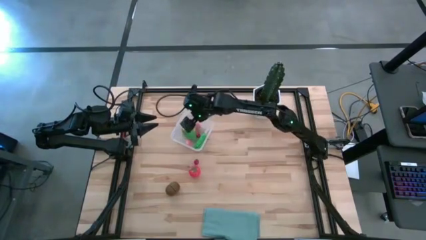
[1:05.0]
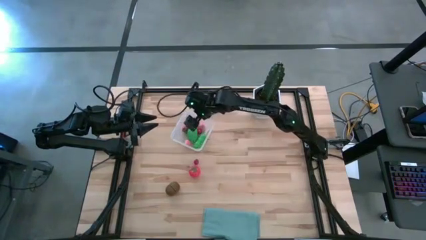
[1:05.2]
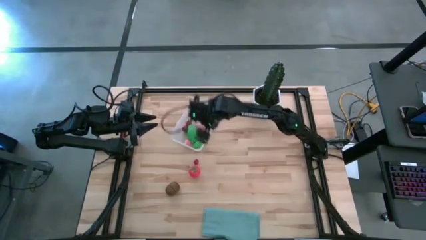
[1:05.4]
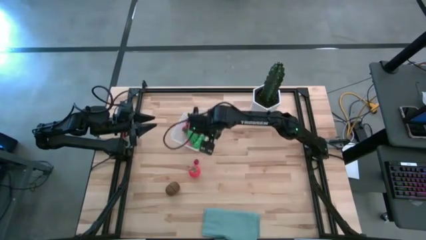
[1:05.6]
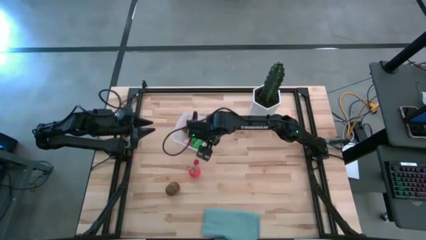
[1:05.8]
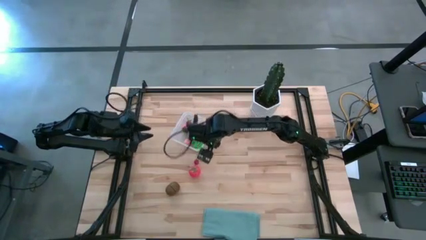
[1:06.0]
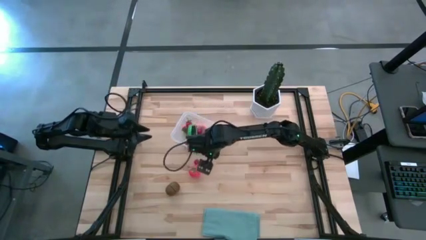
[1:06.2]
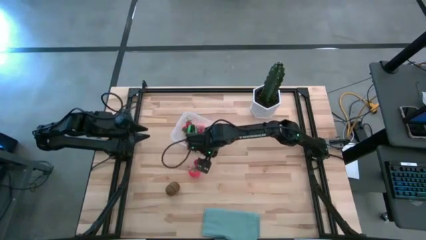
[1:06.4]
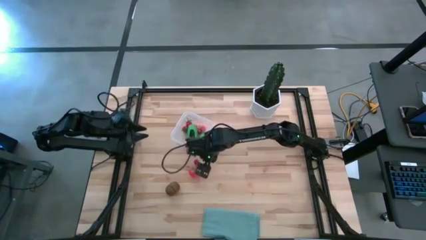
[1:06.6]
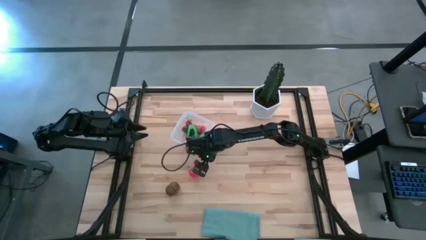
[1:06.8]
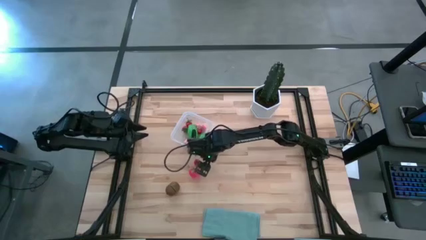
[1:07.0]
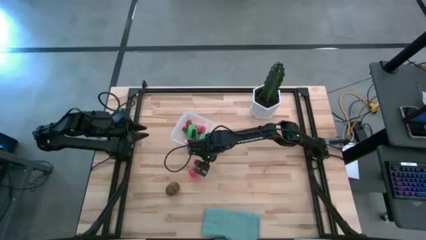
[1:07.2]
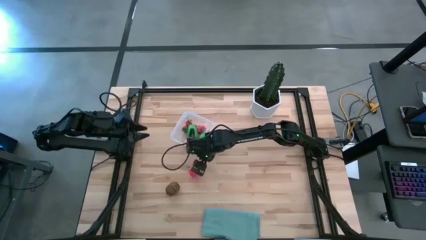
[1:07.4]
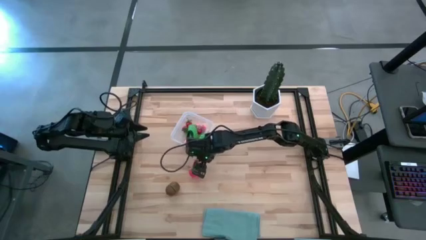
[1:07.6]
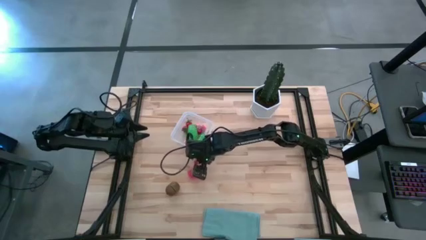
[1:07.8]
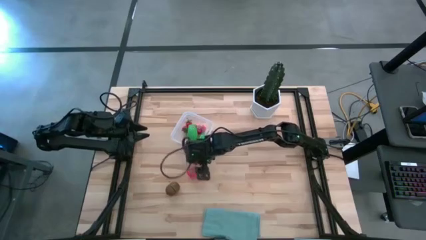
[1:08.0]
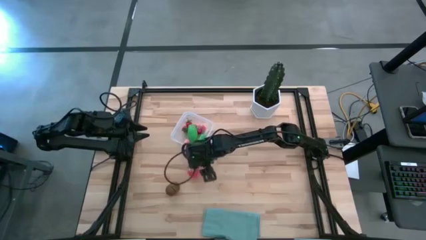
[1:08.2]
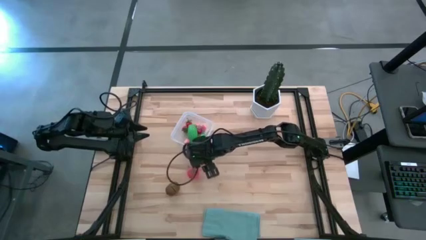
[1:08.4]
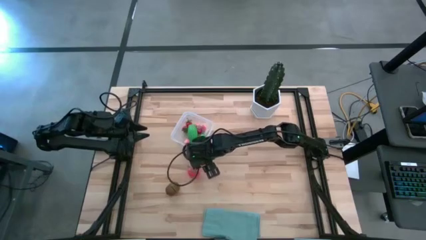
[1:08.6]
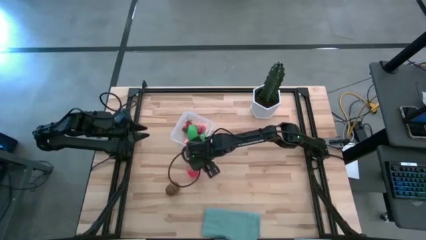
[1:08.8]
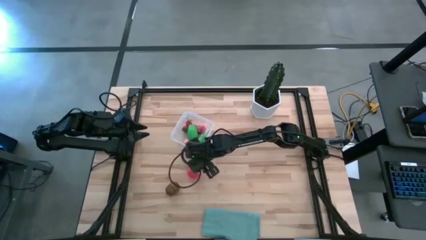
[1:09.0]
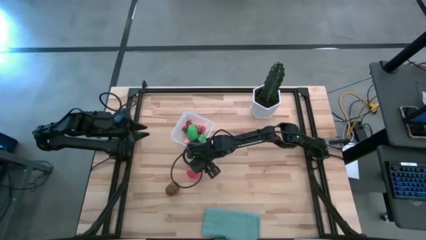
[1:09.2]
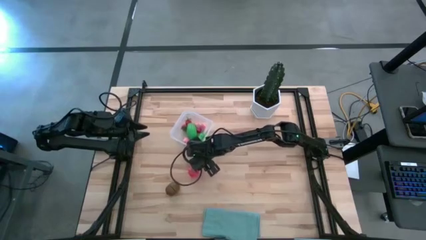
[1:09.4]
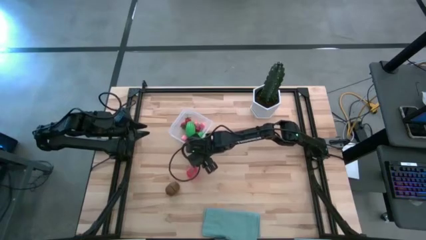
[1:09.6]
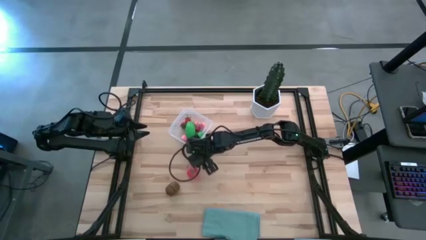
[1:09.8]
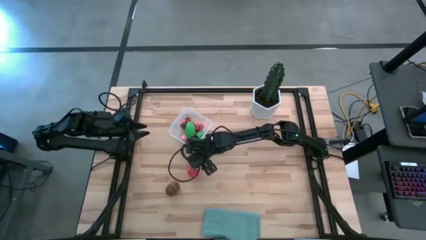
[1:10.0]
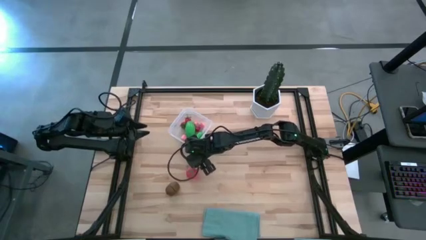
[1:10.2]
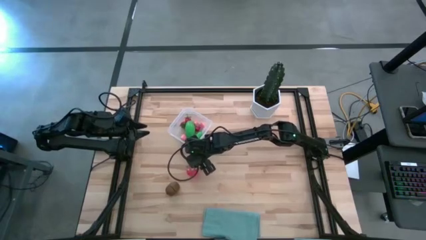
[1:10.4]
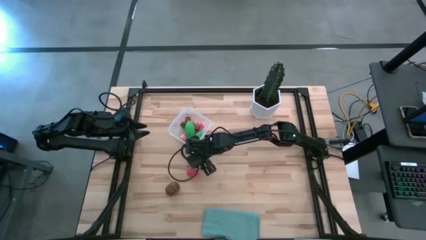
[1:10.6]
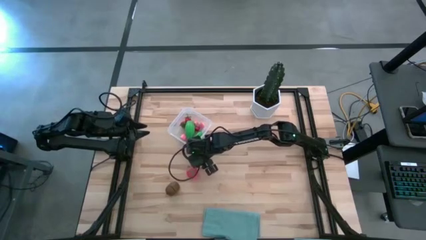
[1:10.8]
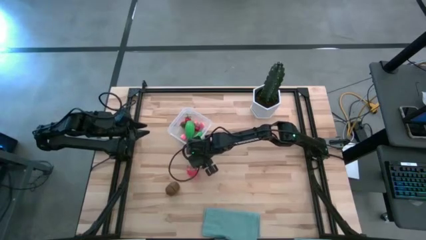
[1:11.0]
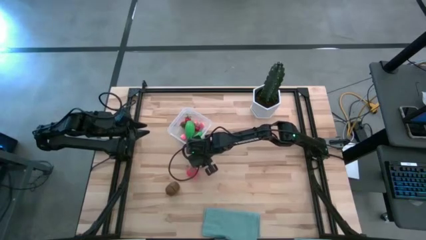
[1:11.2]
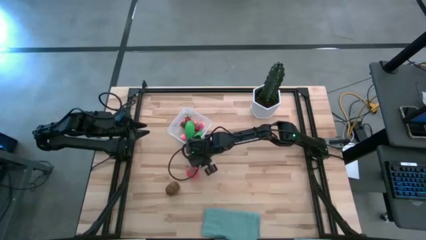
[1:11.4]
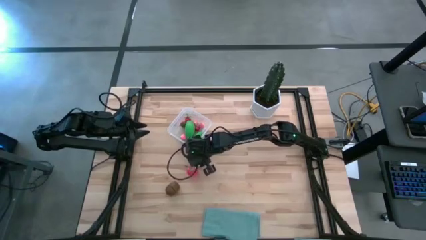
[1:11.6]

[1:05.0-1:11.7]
Task: Pick and placing Produce into tupperware
Put the red cherry into the transparent bin

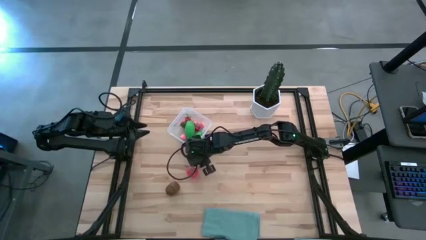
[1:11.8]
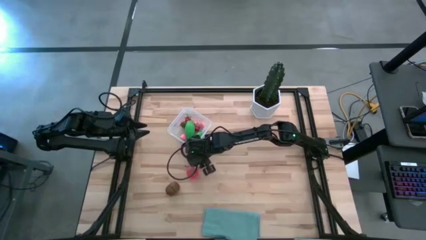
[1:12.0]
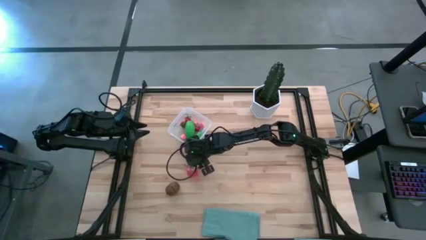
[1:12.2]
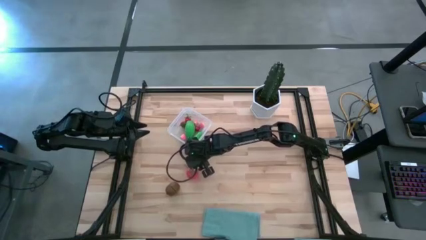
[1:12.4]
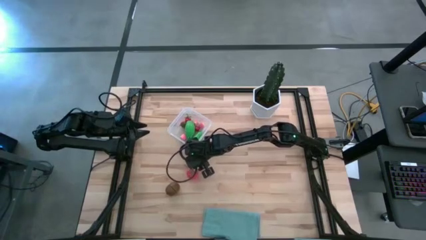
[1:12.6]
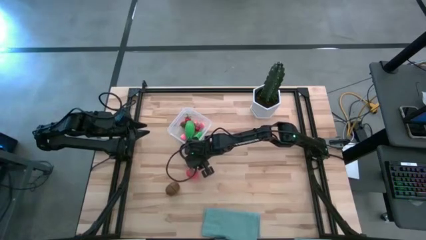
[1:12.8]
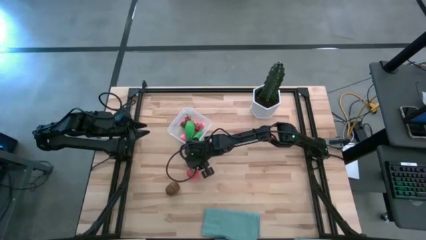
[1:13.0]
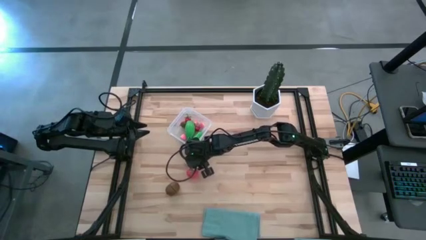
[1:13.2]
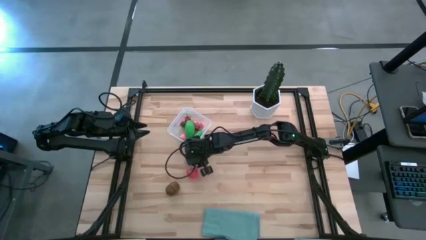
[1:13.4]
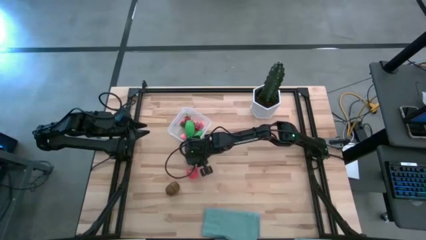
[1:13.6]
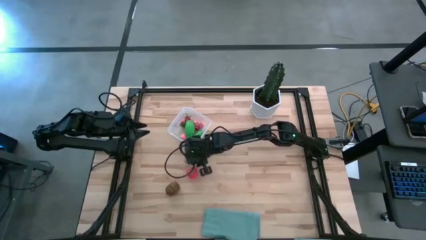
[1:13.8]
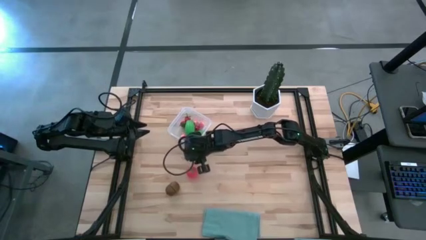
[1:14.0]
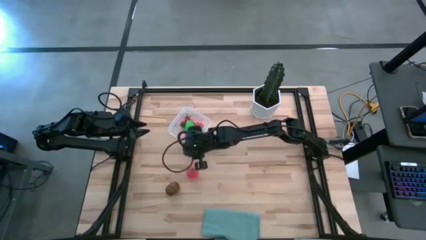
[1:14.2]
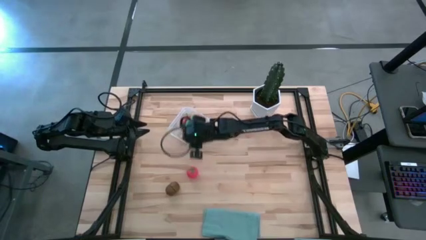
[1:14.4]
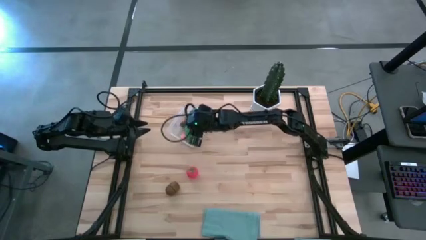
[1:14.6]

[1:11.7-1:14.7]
Put the red cherry into the transparent bin

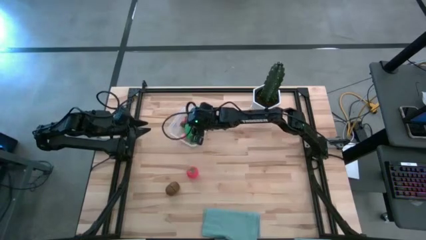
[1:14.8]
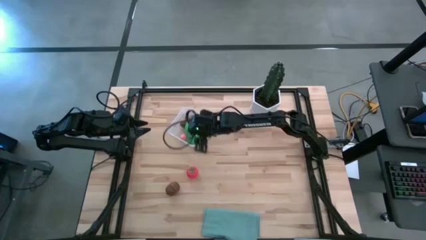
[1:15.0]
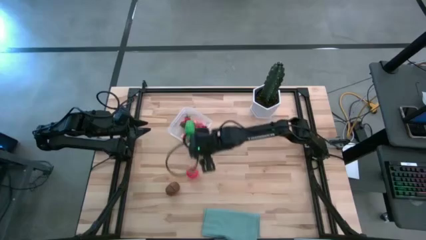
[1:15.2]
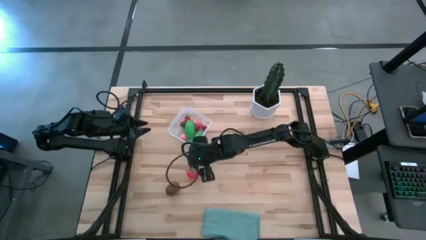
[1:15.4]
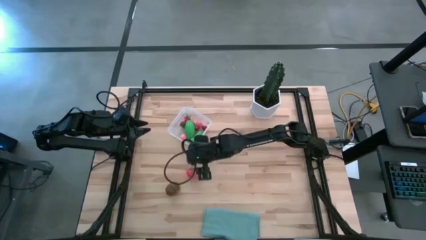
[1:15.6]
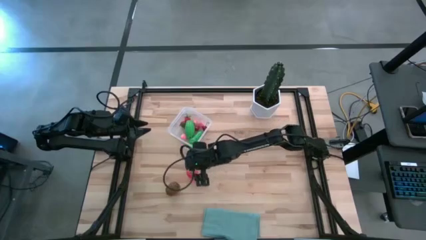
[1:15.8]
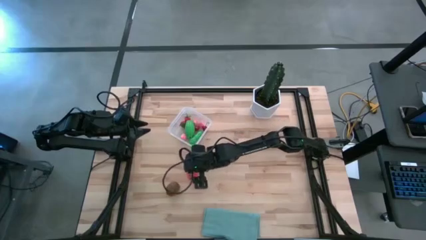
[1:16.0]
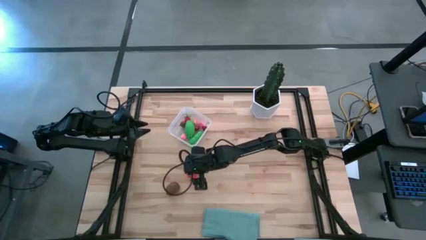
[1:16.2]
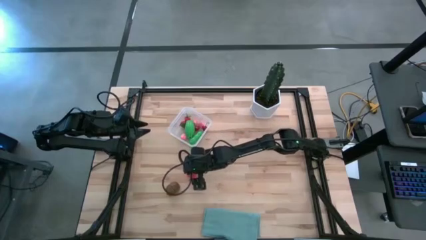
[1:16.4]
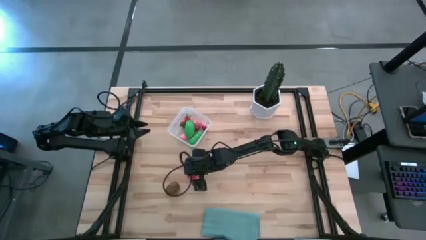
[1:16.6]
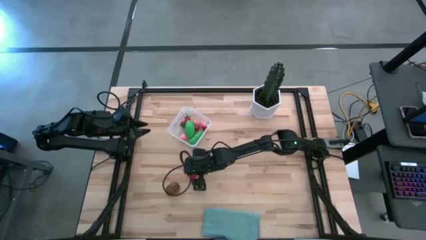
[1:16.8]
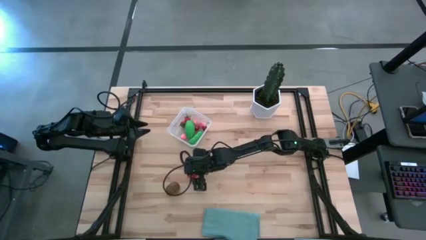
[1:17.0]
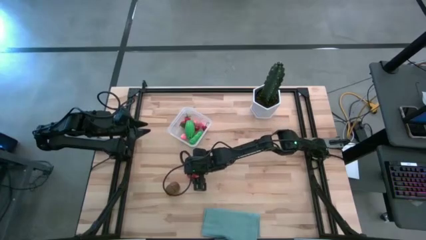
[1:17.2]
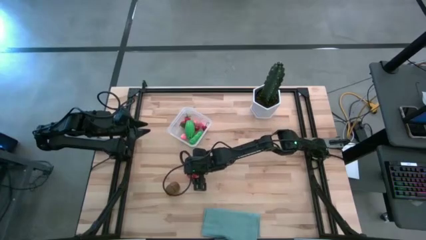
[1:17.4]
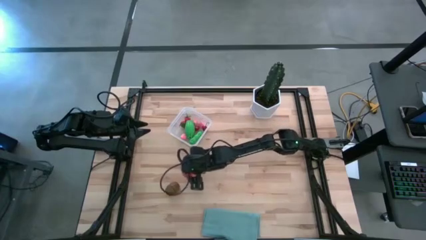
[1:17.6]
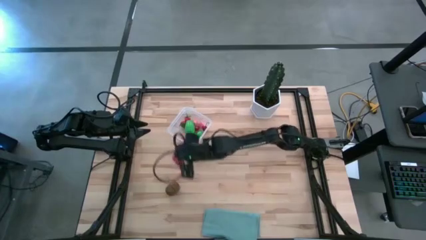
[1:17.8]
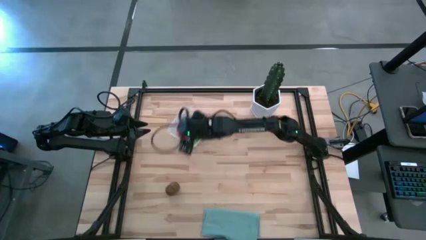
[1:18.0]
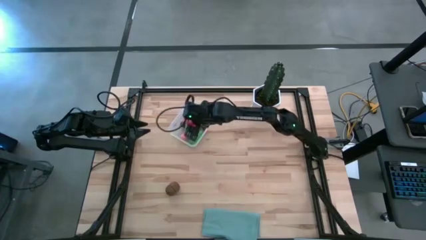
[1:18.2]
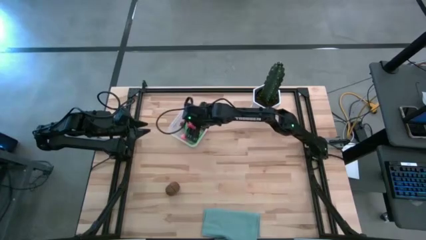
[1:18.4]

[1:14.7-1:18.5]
Put the red tomato into the transparent bin

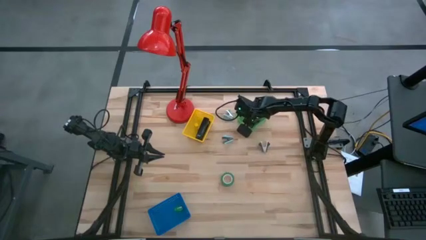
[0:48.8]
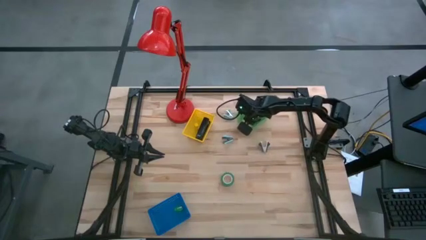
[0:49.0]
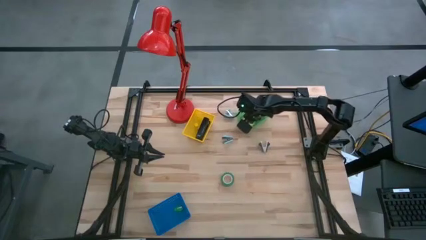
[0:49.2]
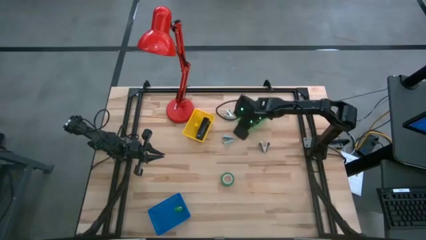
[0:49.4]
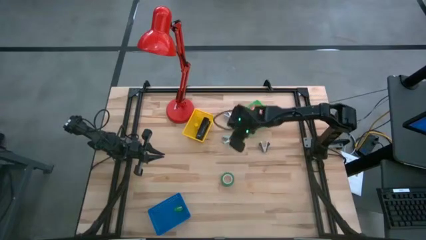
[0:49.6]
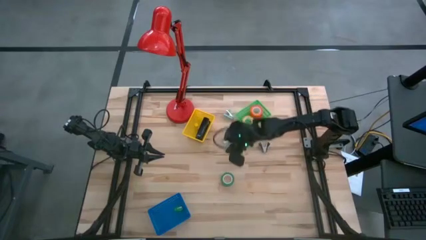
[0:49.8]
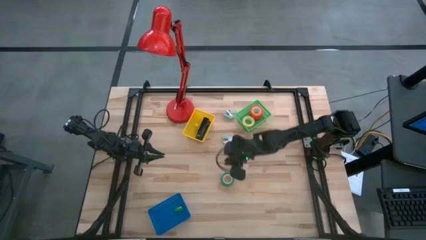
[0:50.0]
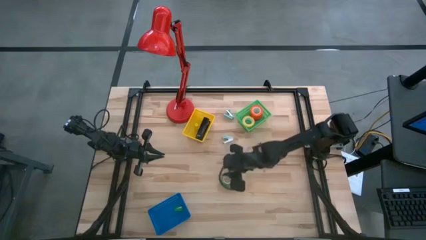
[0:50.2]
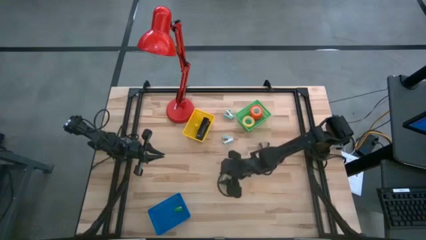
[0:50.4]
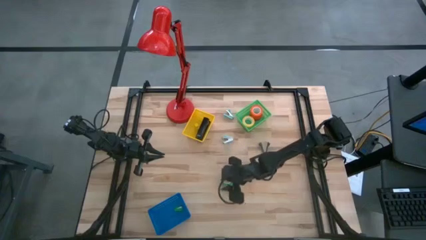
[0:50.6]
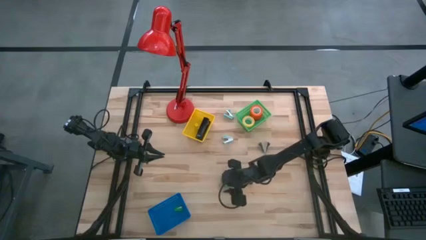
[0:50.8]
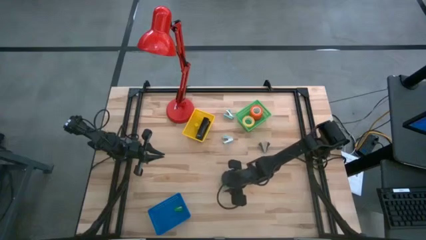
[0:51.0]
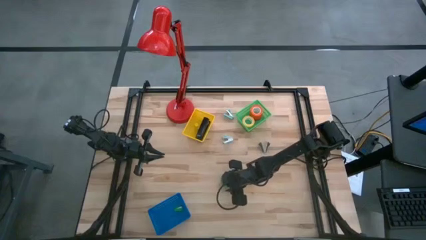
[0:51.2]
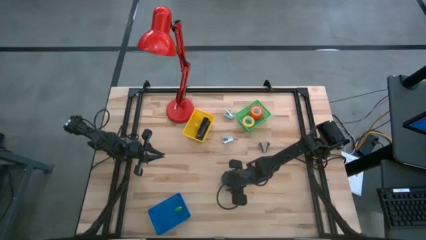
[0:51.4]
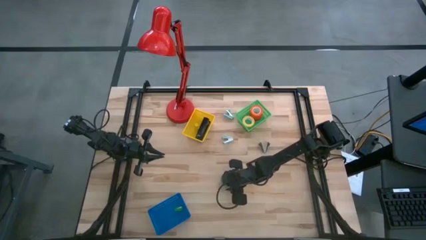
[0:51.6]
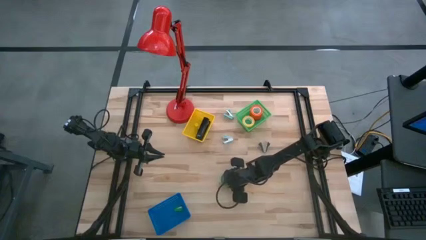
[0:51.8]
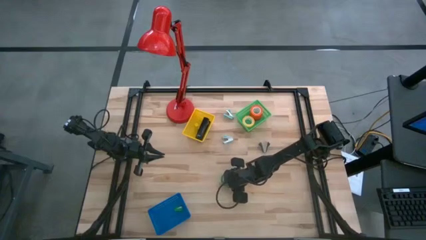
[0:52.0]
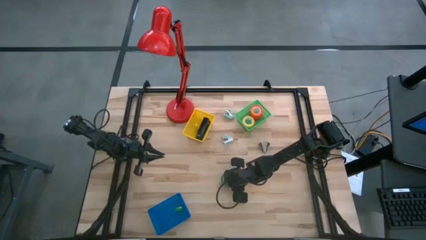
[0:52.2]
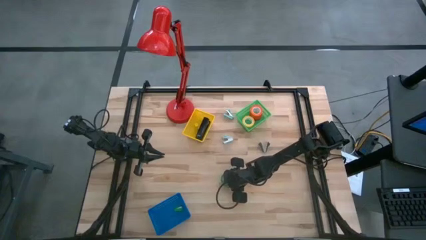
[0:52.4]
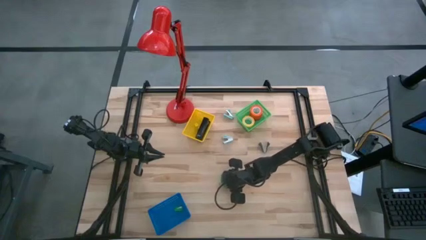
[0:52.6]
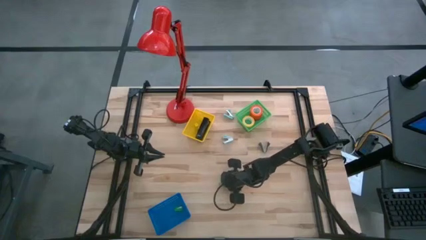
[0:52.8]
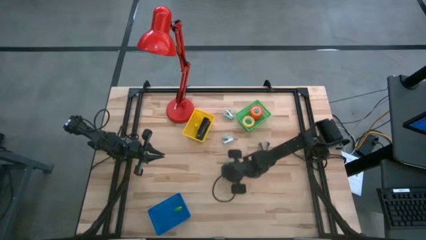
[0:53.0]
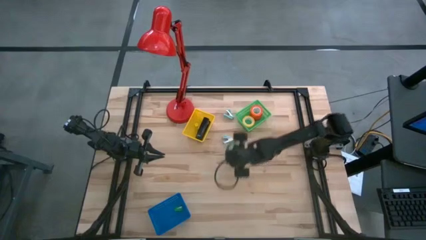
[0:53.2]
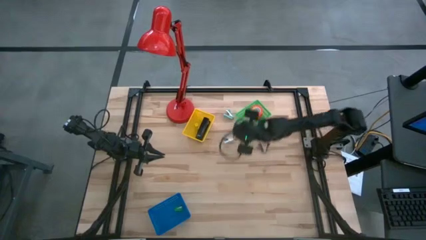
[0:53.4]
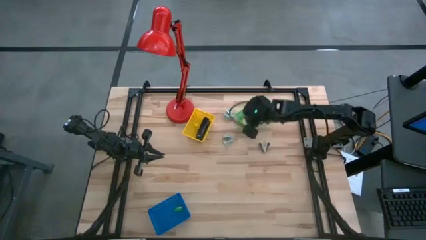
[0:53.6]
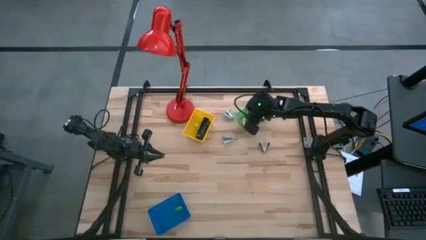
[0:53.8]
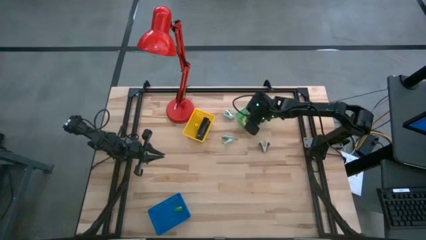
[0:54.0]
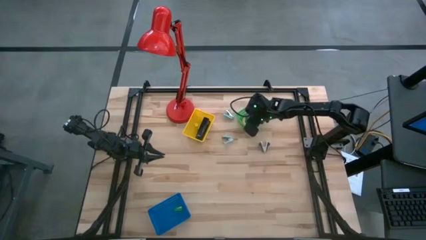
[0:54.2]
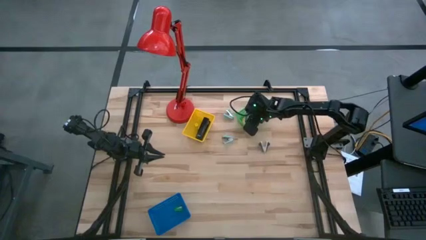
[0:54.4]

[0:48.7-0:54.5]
Task: Pick and place Stapler, Stapler remover, tape
Put the green tape into the green bin
